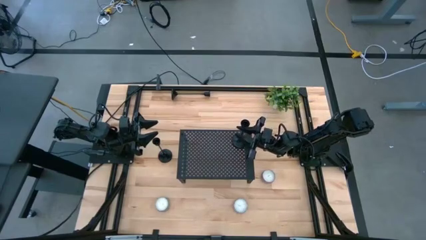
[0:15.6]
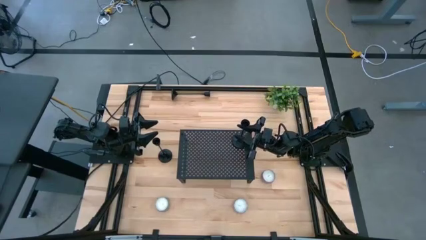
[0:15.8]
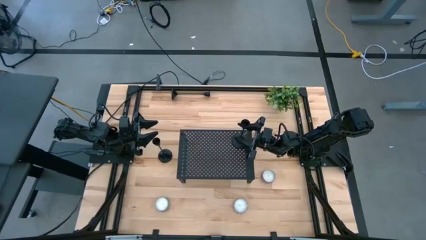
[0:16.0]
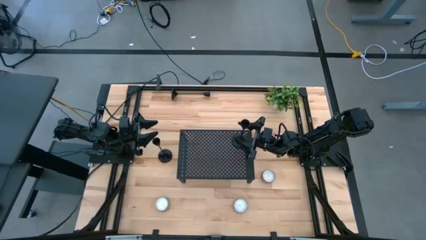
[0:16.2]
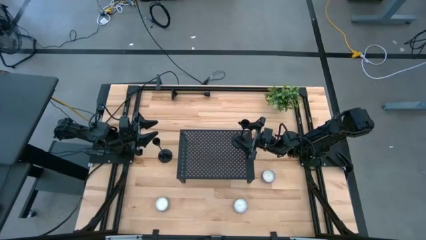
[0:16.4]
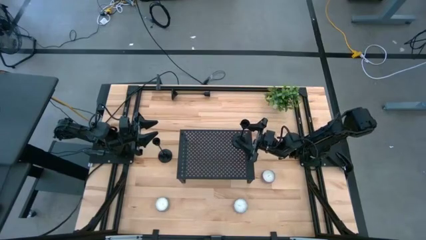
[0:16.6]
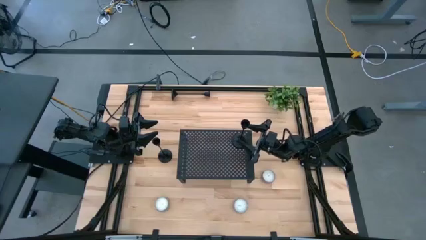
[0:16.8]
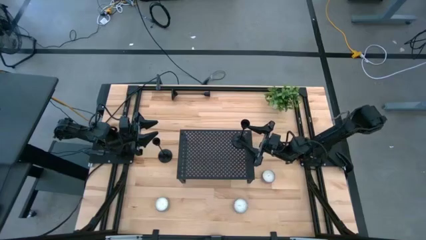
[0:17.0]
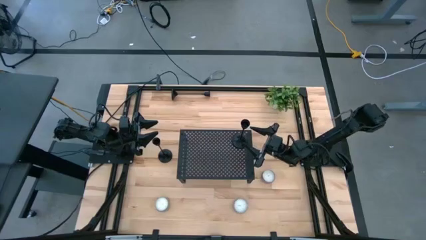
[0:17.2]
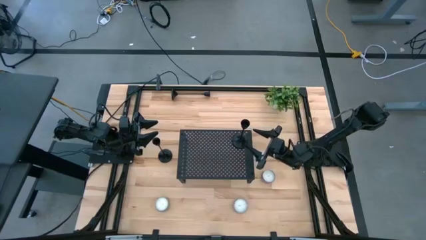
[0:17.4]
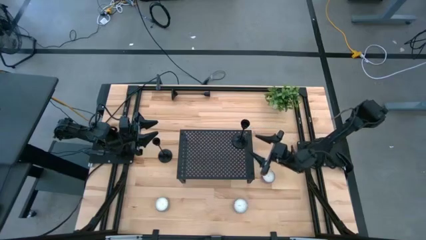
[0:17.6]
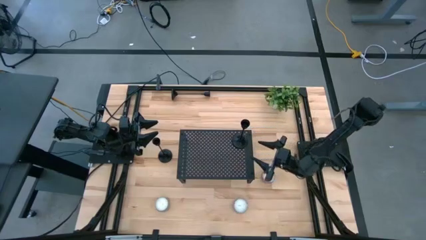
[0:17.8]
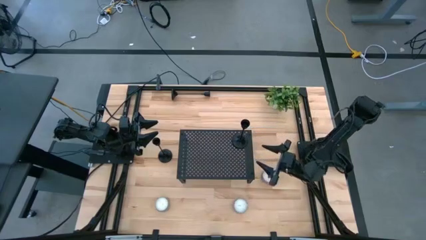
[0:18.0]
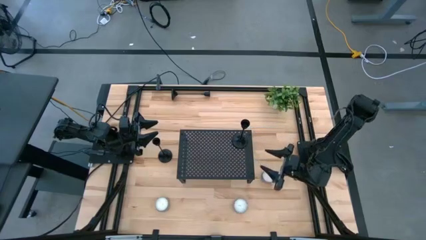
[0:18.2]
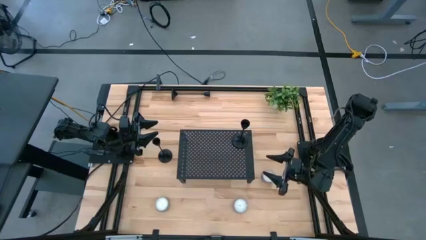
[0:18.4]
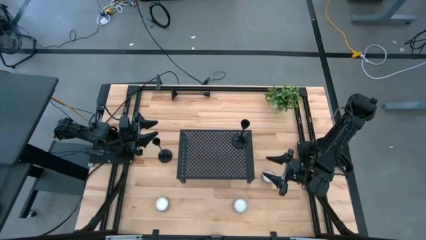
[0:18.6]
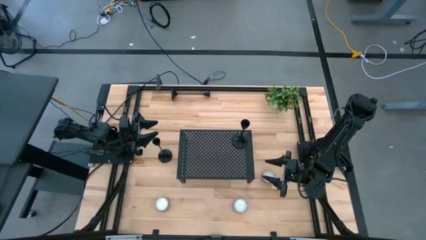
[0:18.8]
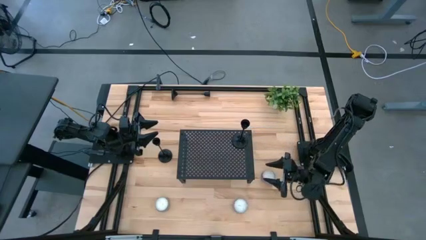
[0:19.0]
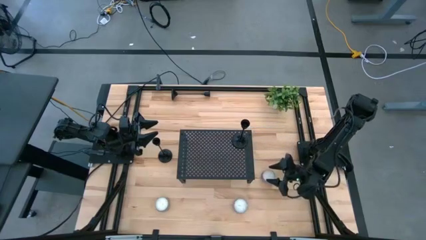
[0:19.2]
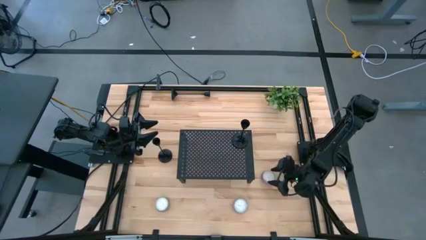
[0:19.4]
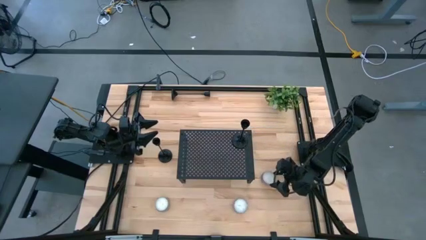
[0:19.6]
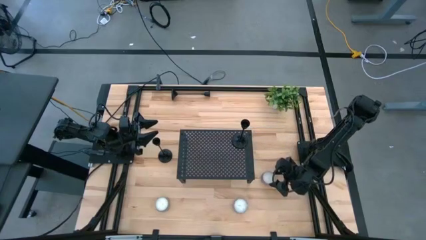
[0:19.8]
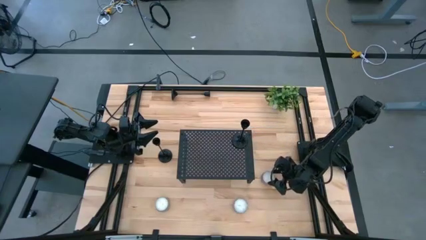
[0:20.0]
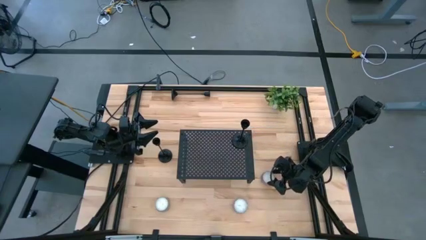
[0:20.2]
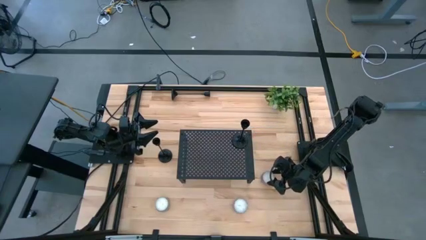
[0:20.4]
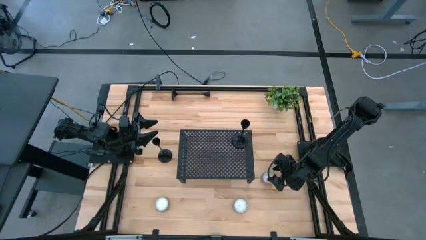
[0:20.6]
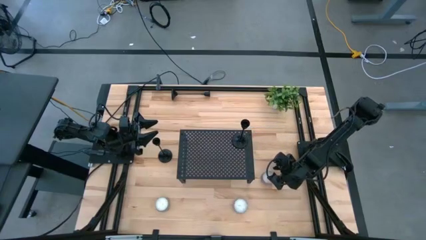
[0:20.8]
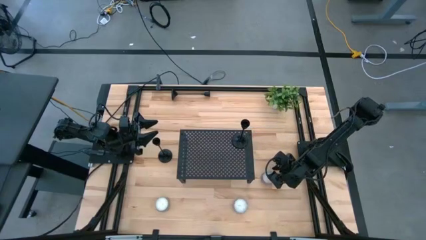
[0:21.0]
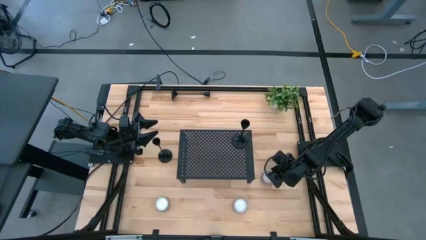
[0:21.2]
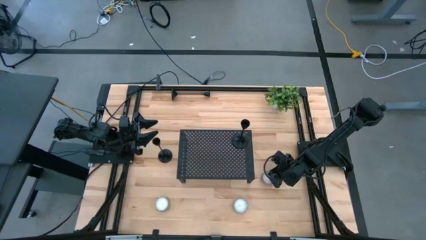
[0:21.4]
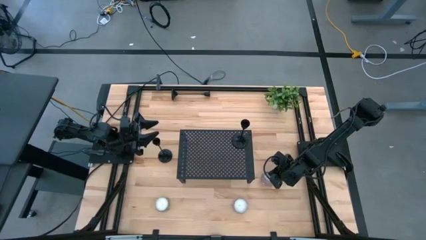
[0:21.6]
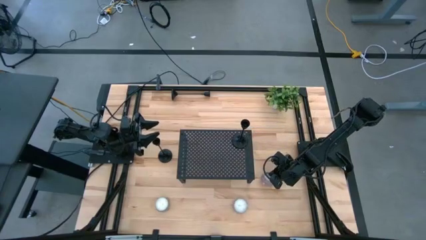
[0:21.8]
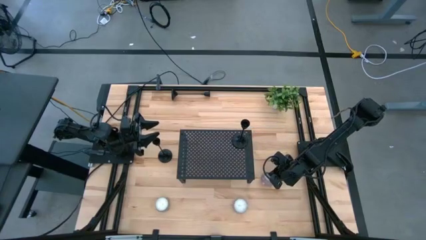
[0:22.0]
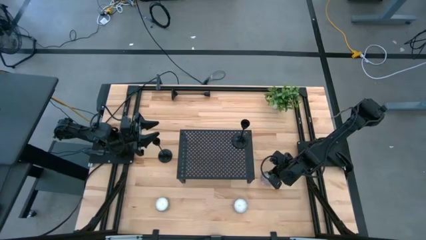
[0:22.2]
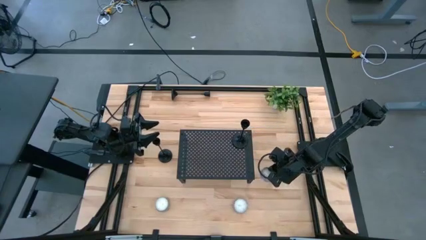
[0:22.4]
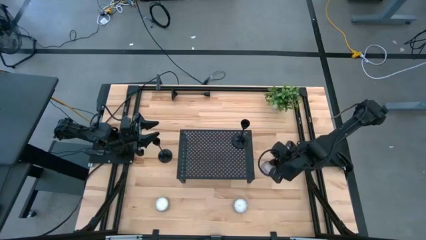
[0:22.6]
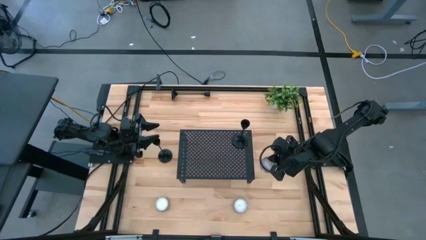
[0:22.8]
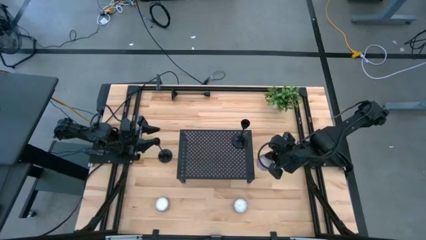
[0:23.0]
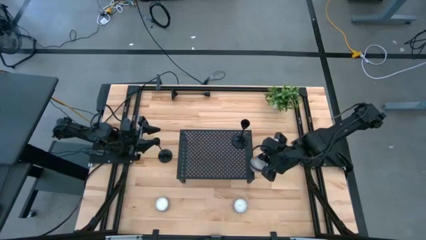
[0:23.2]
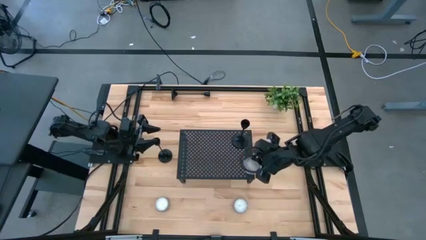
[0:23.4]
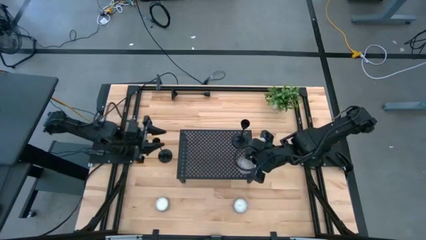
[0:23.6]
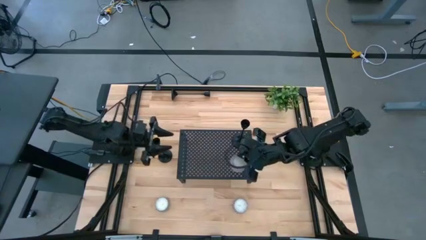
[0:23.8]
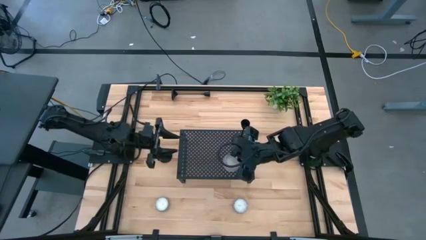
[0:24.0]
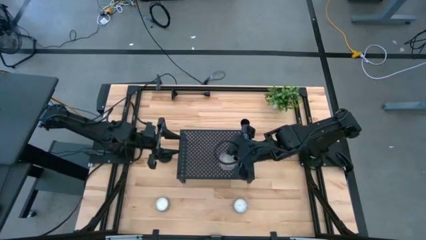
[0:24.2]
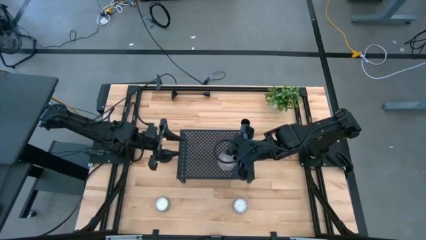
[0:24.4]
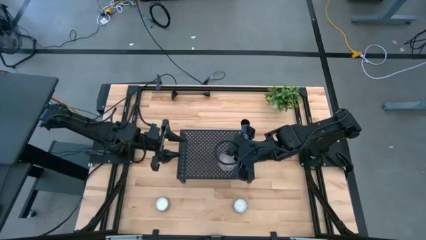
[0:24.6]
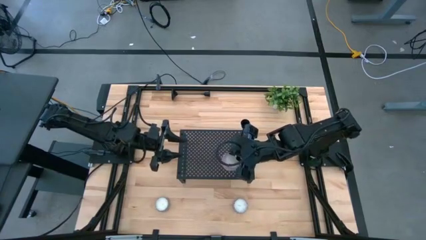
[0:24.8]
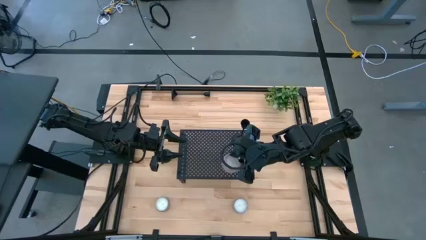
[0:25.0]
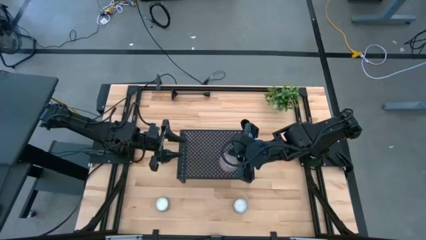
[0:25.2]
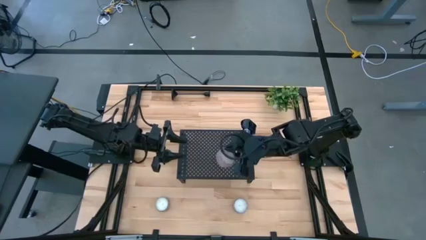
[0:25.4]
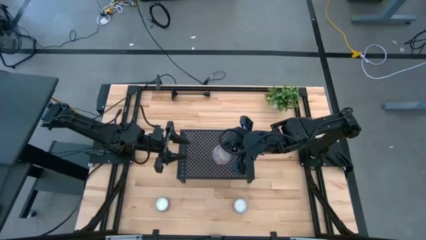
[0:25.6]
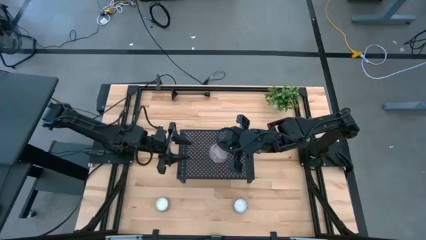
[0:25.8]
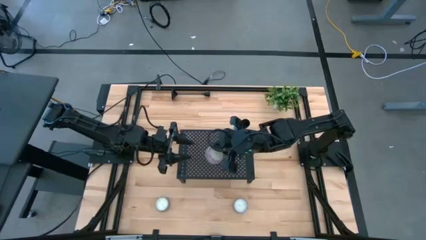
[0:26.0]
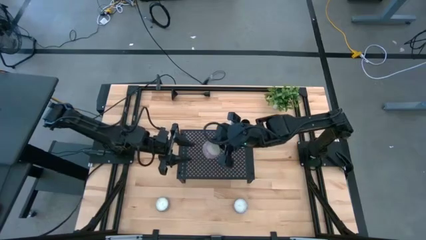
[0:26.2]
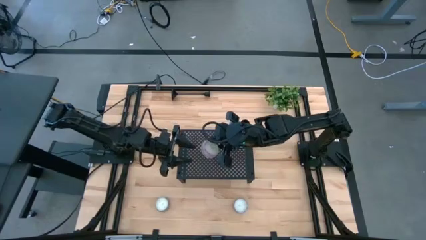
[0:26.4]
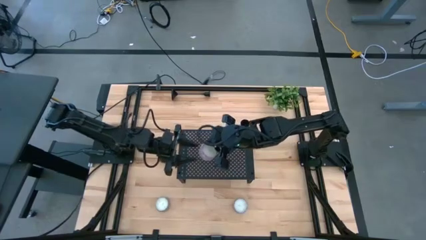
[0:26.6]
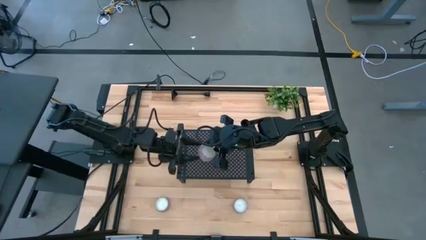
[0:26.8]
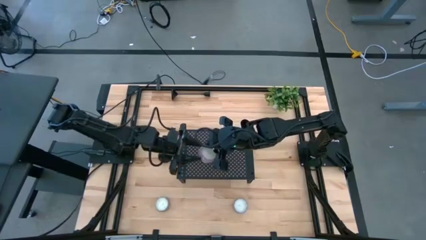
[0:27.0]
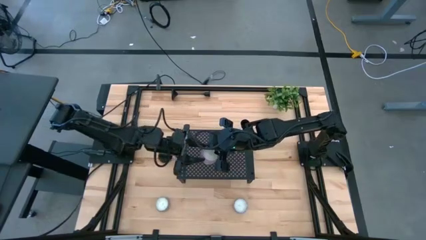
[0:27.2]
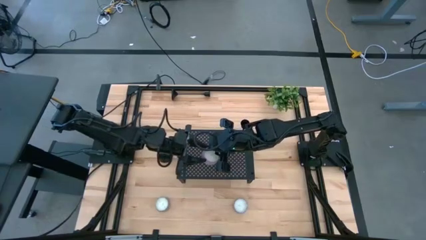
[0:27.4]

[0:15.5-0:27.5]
Task: Pick & Place candle stick holders
Put the pink patterned scented candle on the shelf

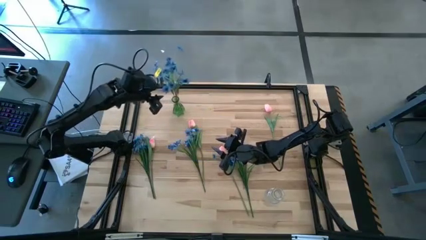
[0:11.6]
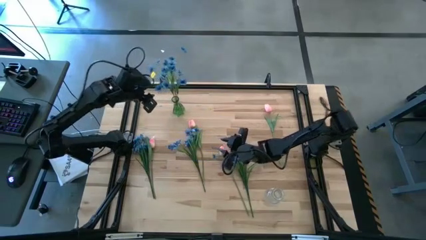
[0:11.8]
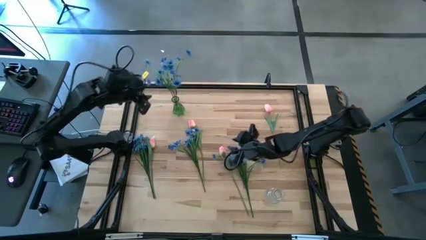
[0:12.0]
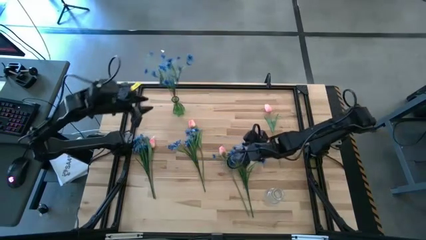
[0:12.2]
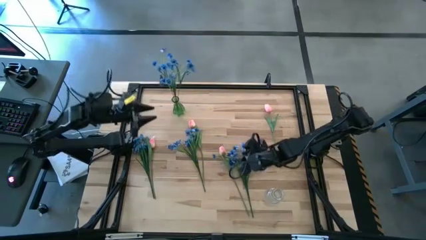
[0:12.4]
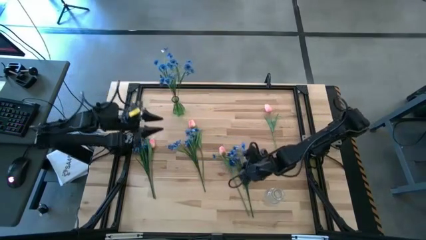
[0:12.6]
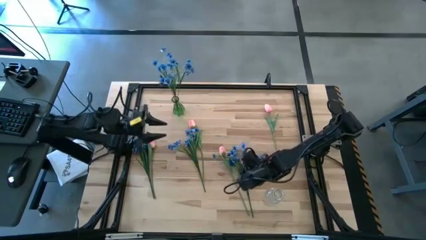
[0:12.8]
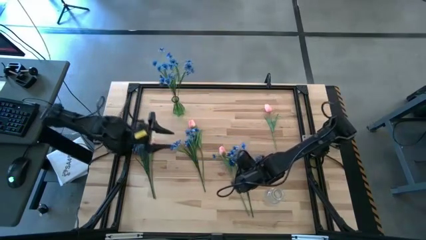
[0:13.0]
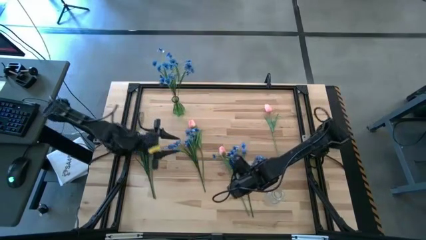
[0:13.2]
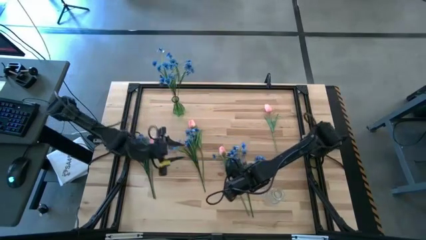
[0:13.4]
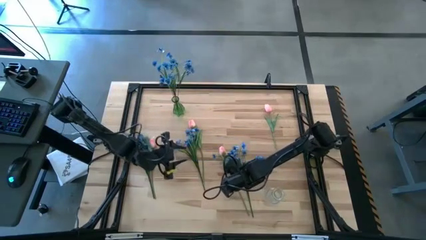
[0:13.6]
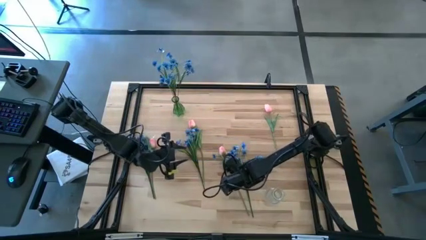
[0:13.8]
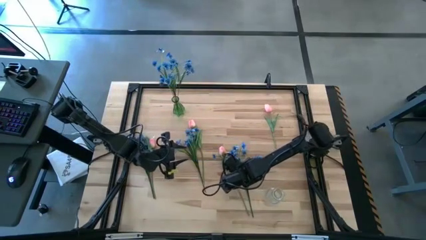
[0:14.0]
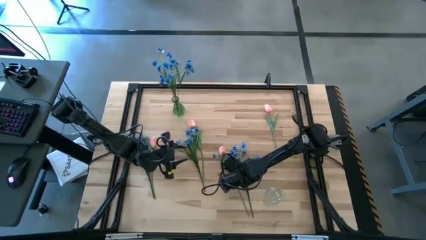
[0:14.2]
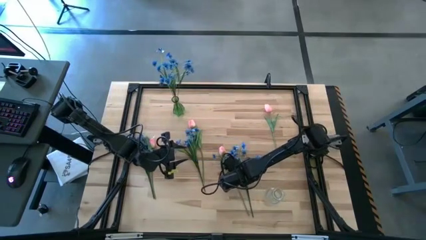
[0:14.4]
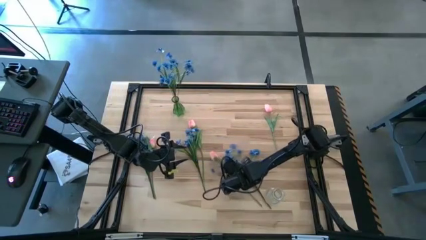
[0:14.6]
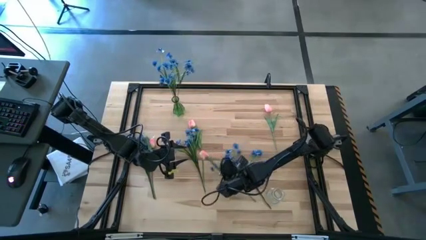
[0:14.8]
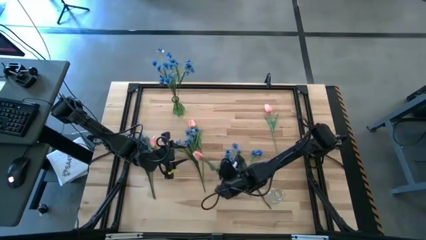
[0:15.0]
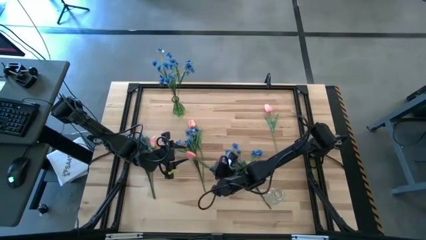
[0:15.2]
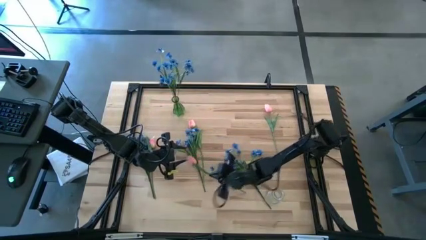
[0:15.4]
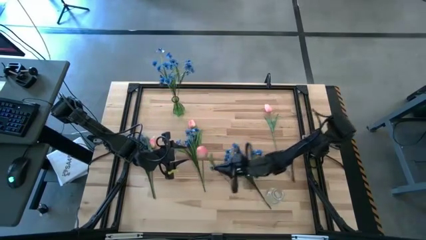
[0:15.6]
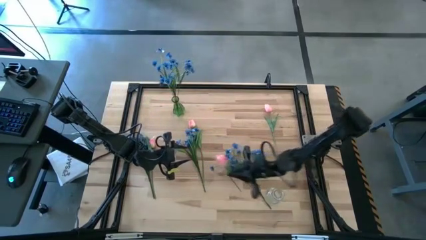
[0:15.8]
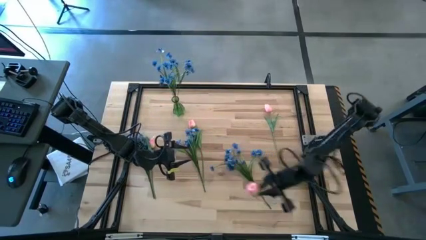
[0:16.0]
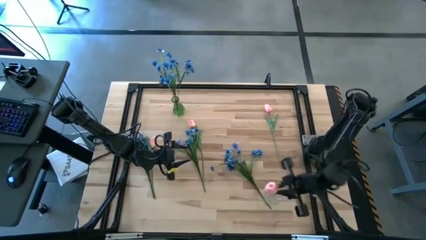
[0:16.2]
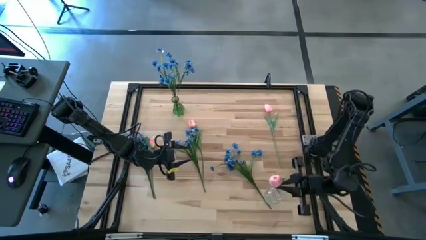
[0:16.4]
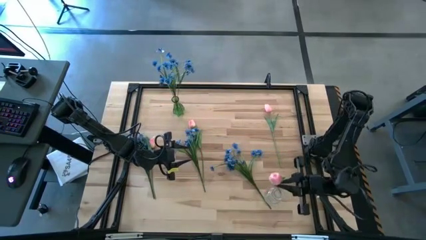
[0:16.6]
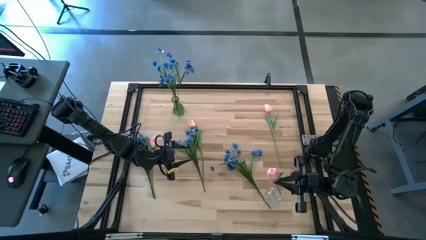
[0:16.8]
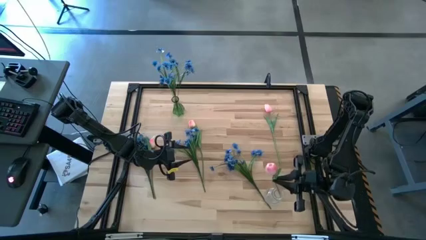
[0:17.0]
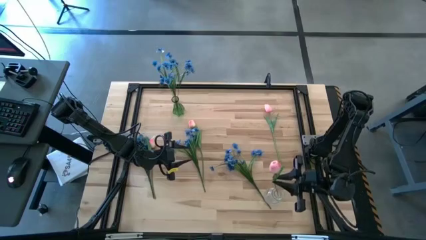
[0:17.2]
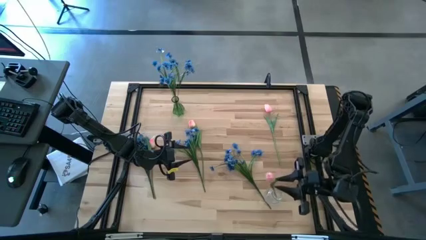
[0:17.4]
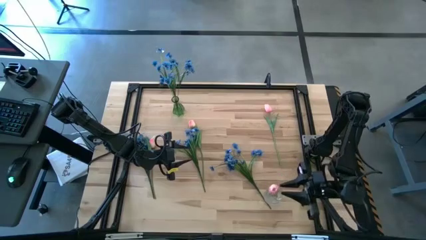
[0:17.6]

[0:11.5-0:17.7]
Task: Sort flowers into vase by color
Put the bottom pink flower into the transparent vase
